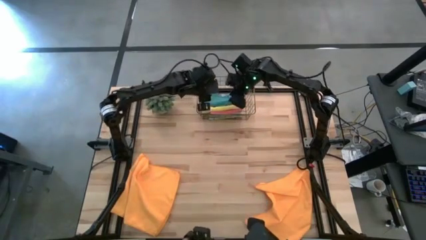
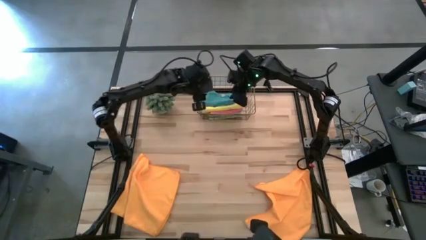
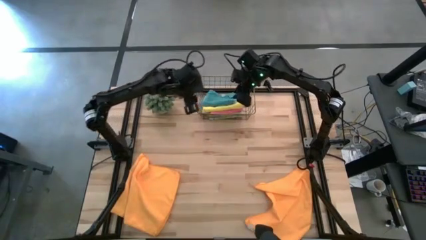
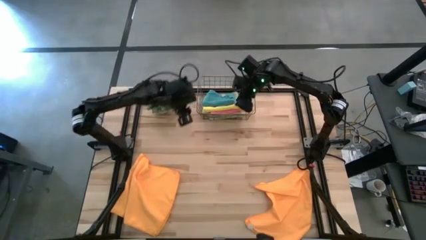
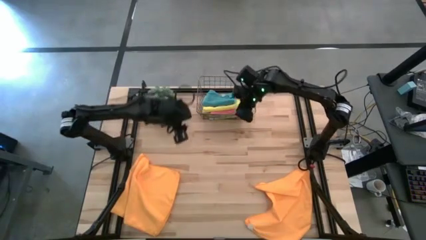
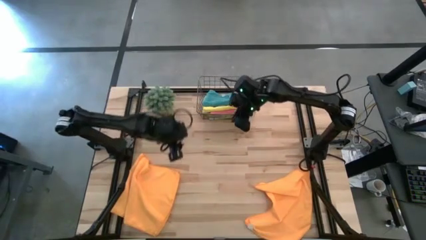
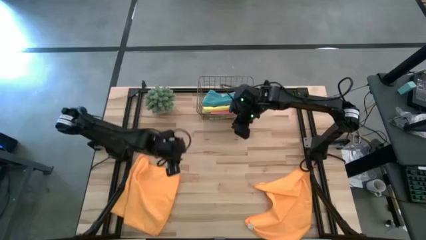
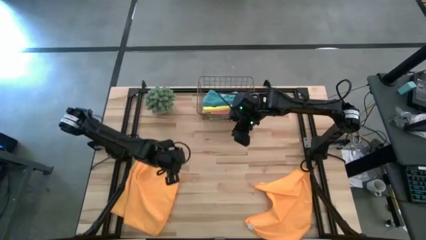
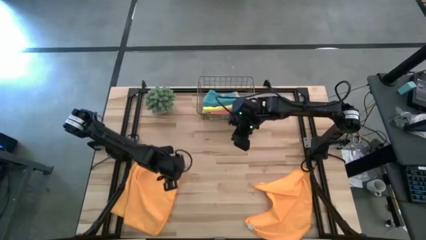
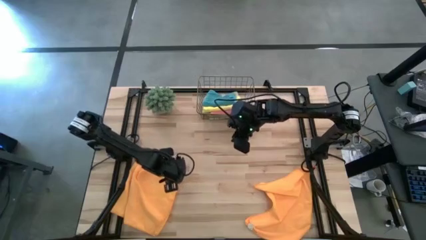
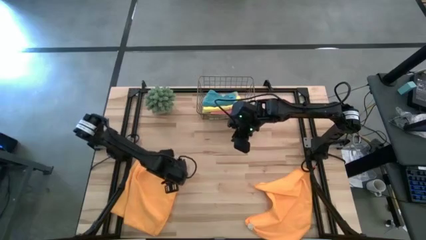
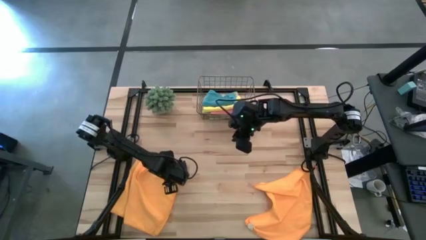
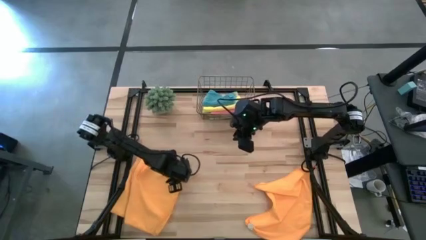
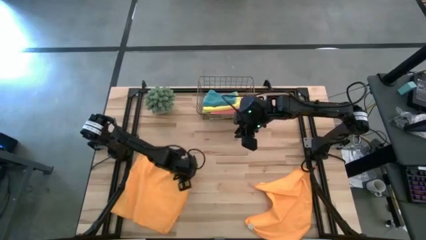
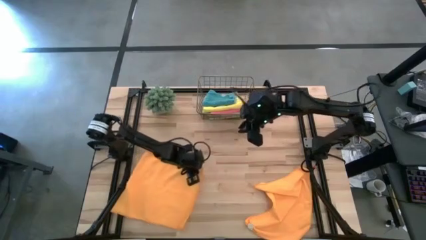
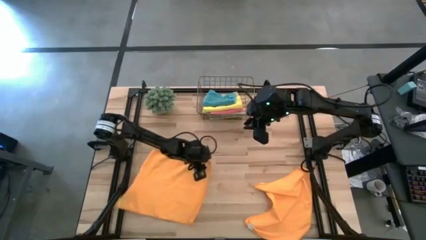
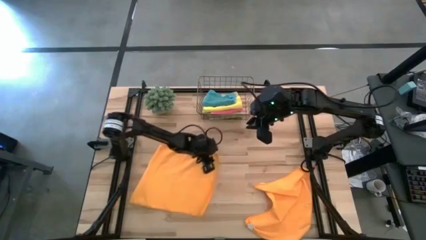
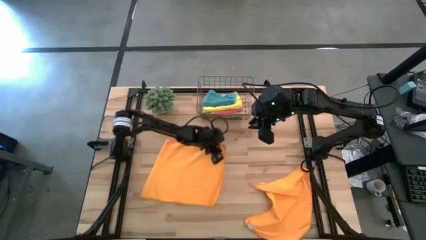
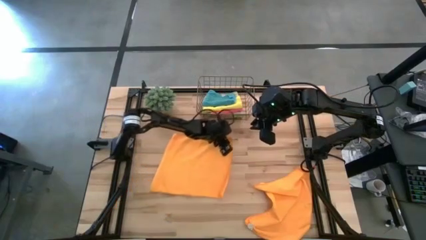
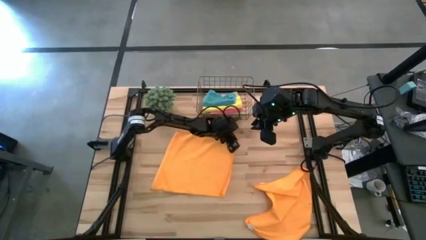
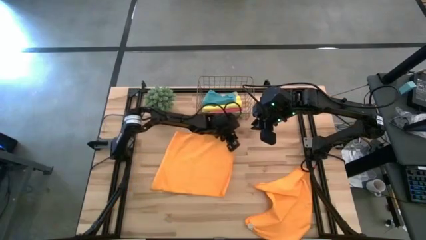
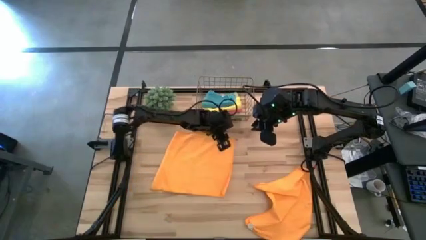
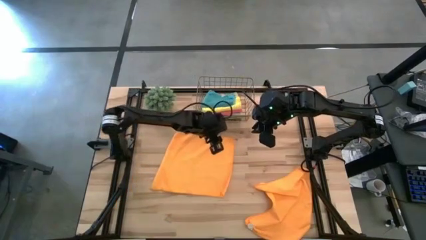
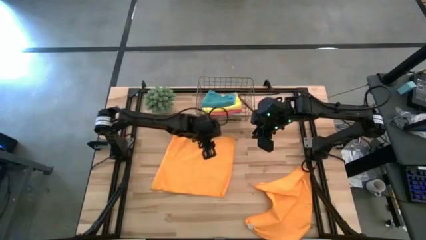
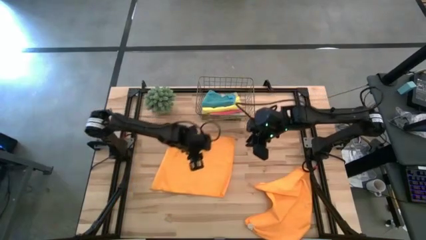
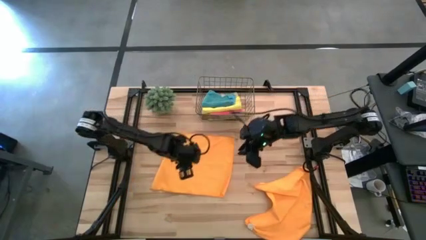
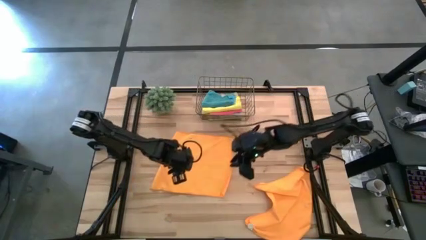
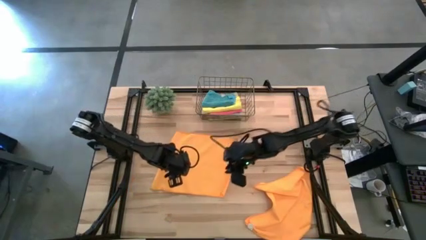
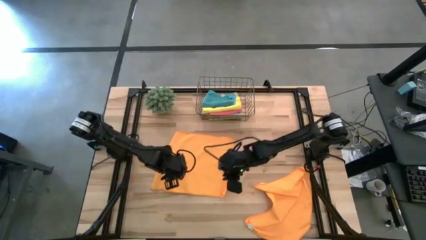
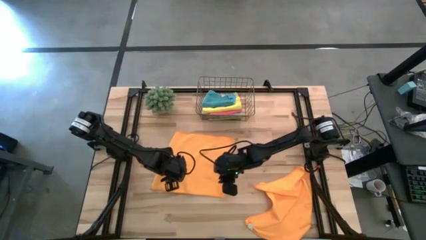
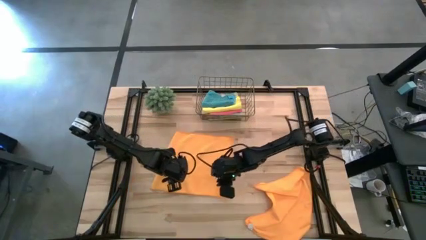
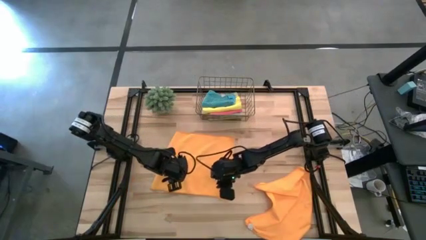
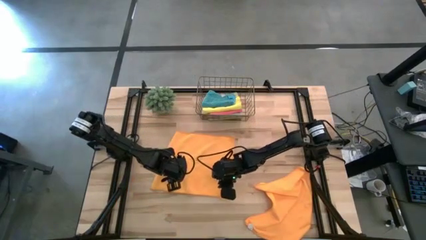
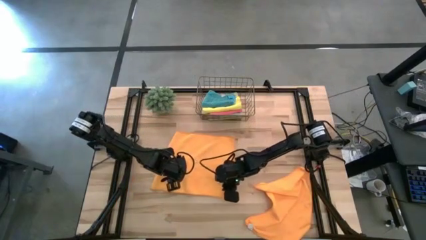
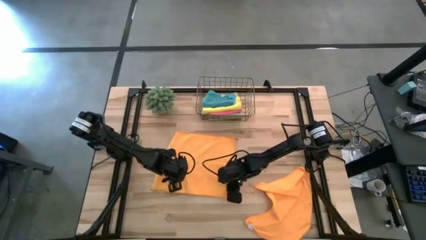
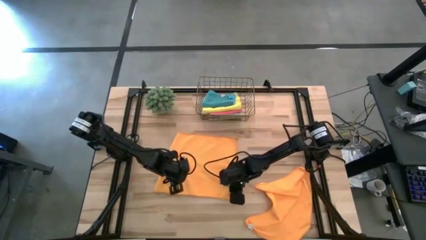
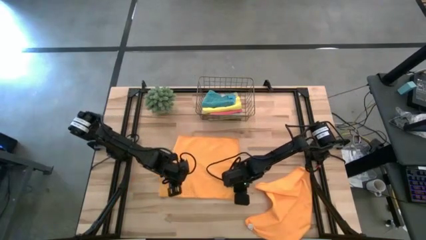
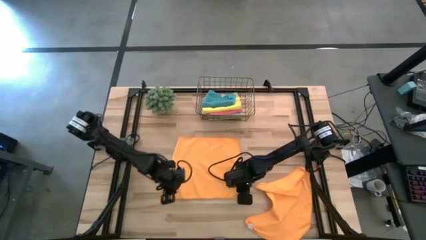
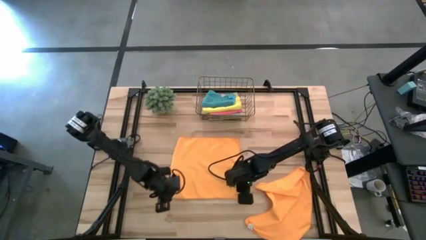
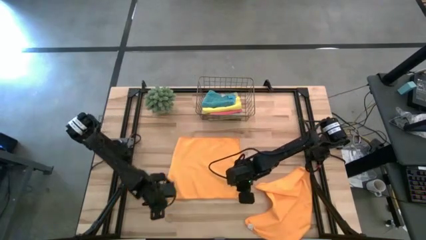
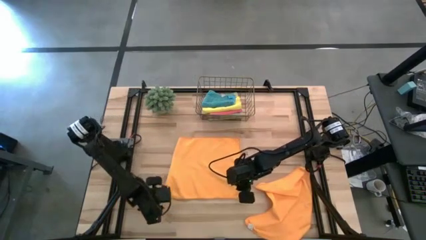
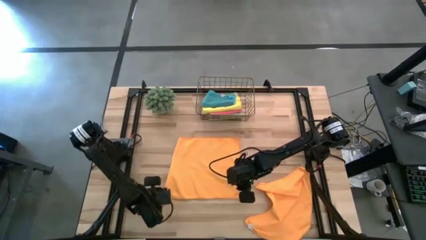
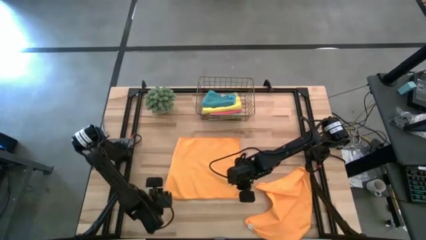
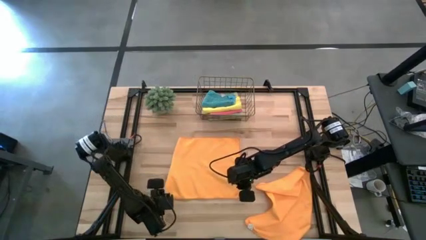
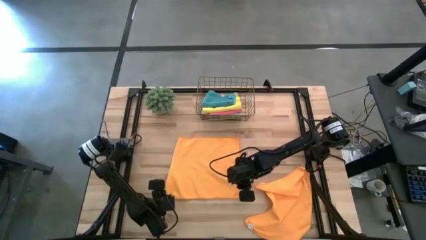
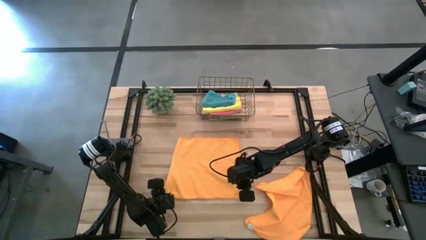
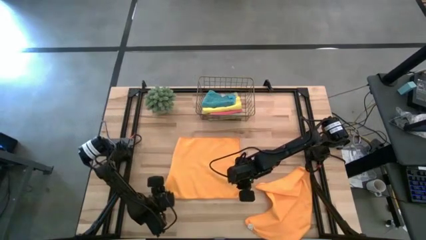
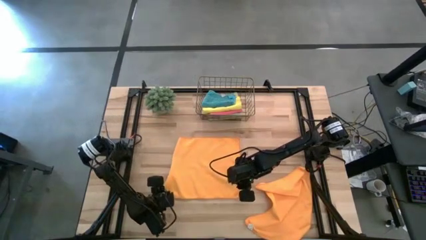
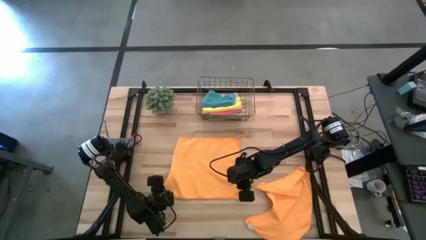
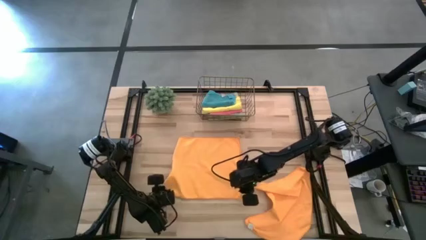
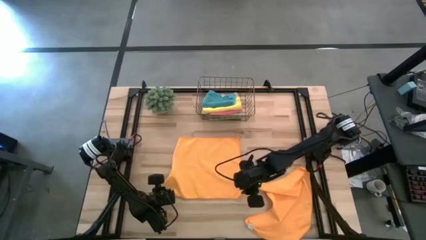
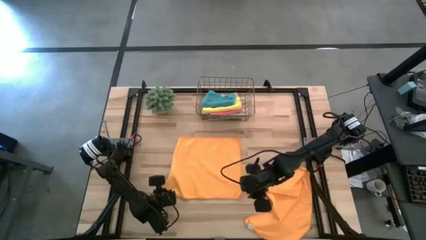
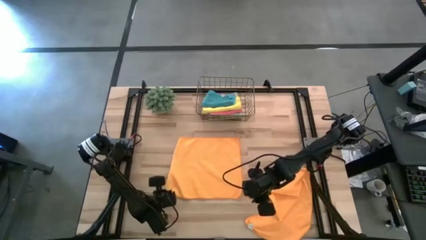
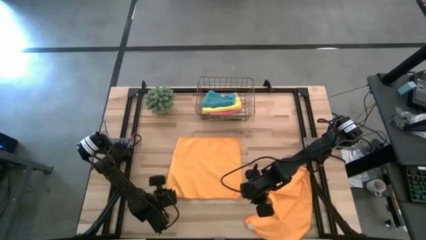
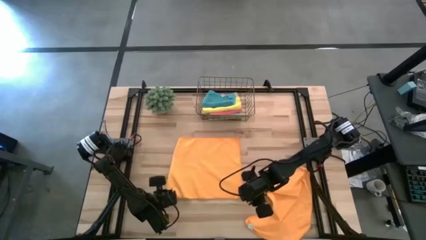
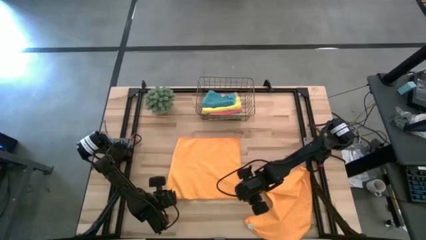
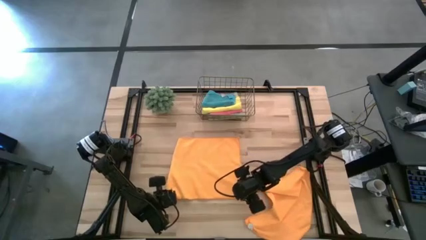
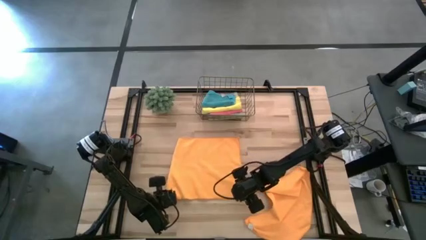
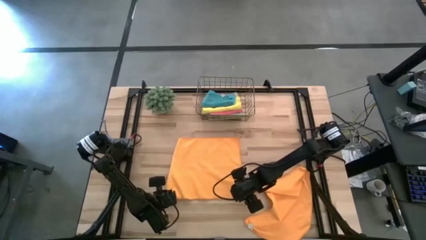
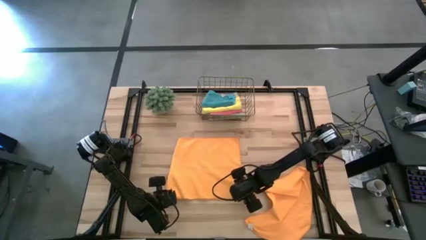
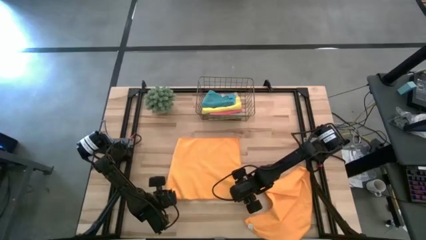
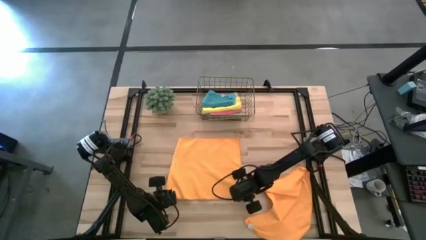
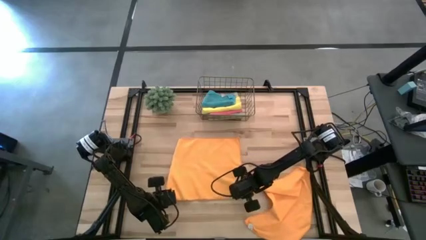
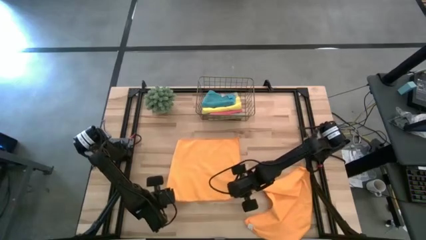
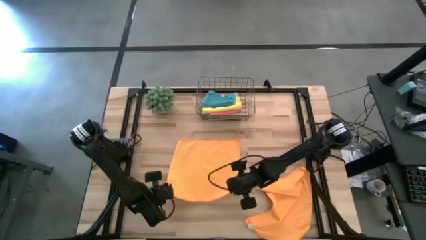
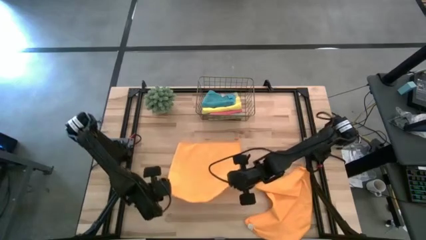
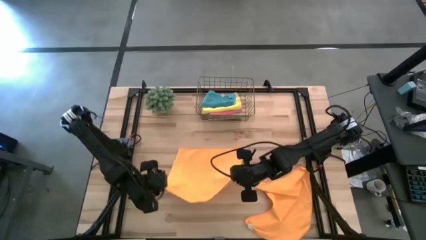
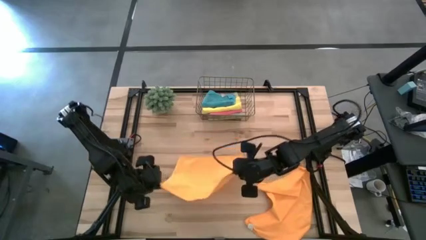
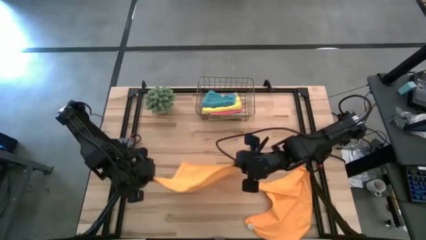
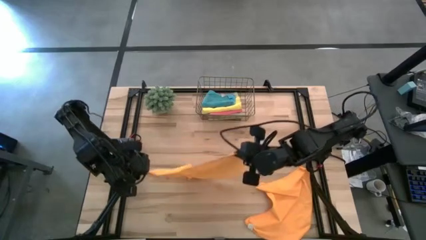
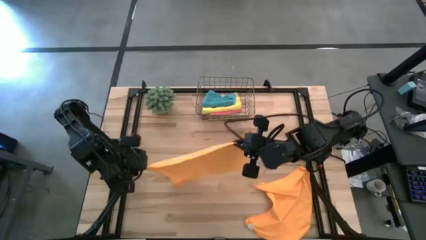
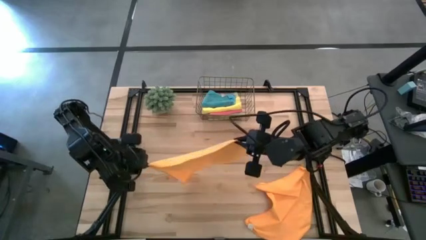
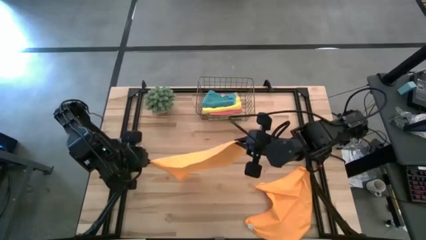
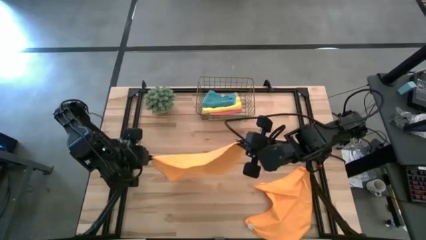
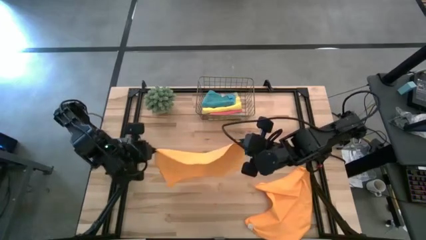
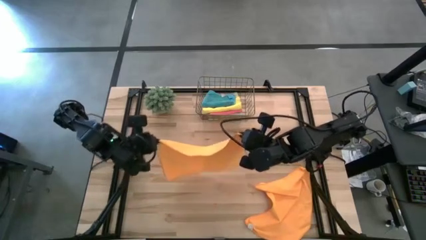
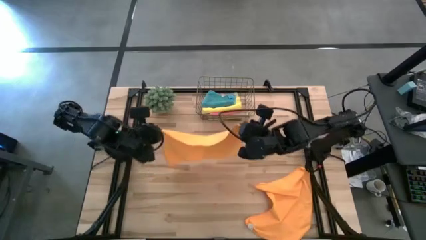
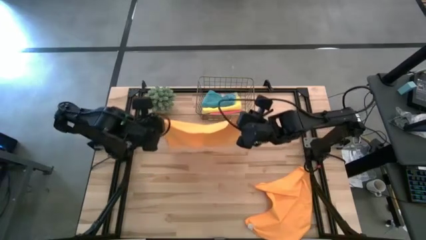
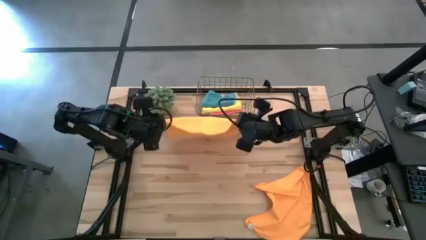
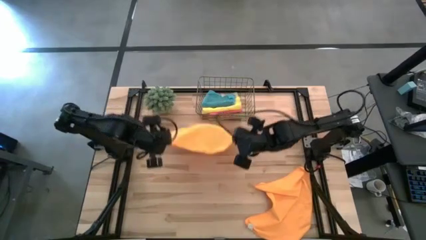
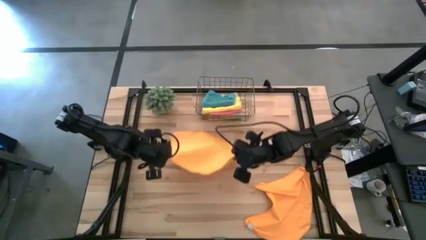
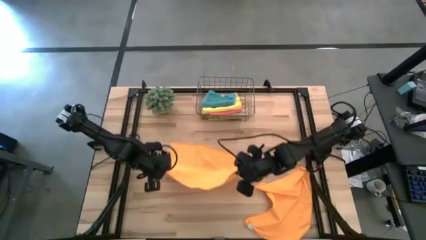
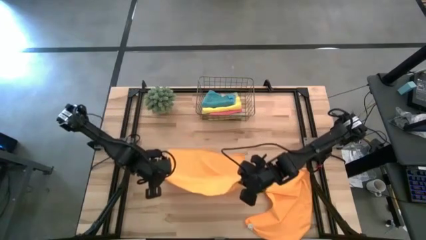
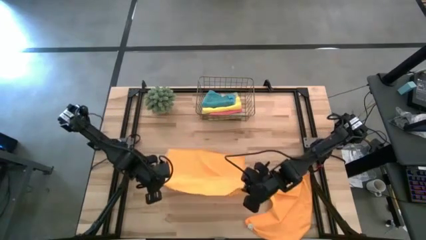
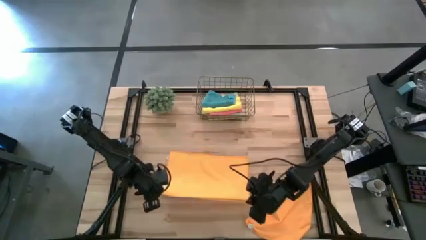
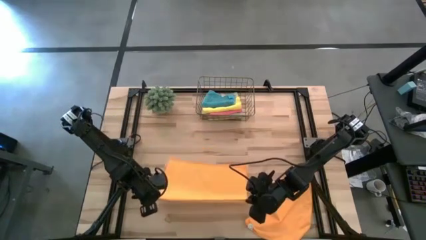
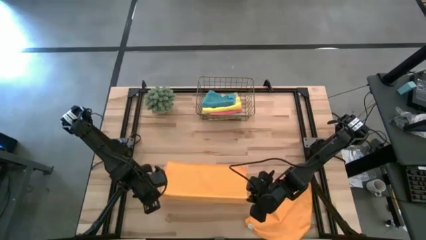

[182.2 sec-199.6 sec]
Task: Fold microfiber towels
Fold the left orange towel
